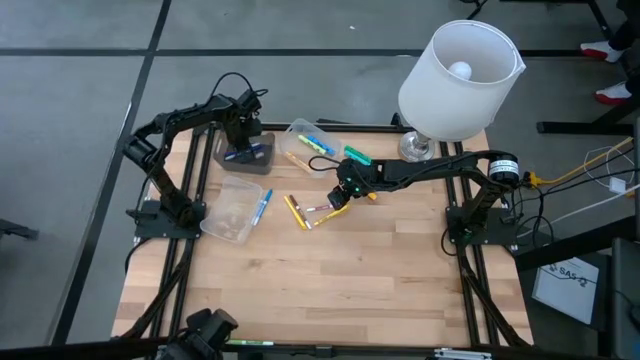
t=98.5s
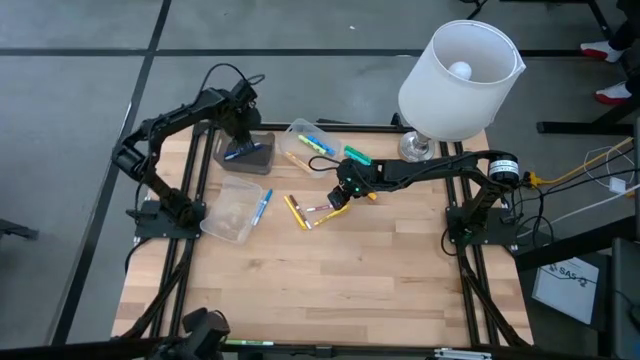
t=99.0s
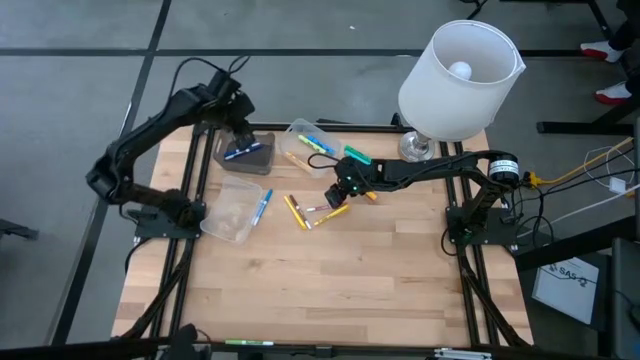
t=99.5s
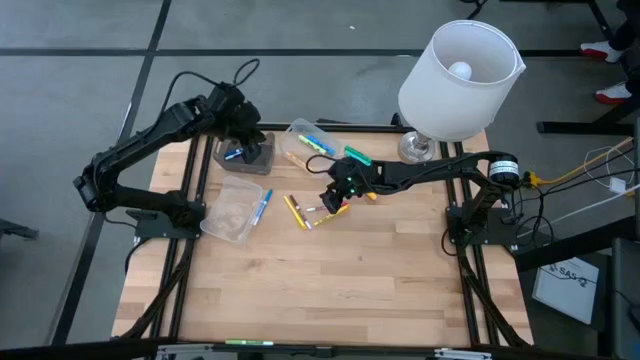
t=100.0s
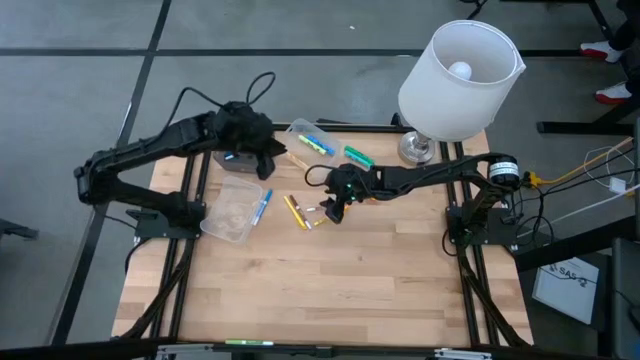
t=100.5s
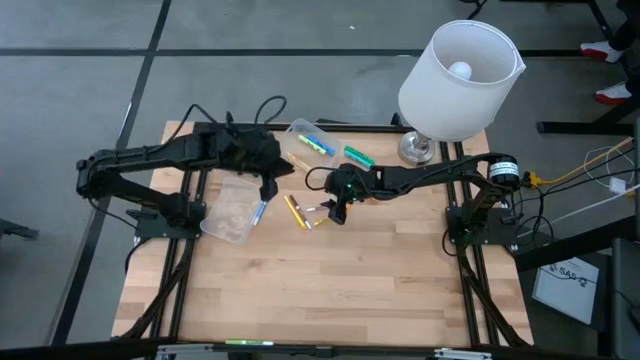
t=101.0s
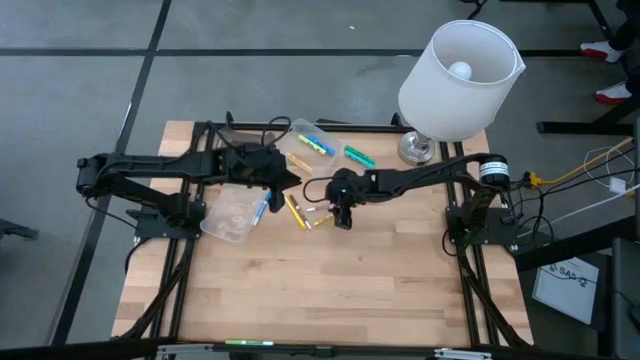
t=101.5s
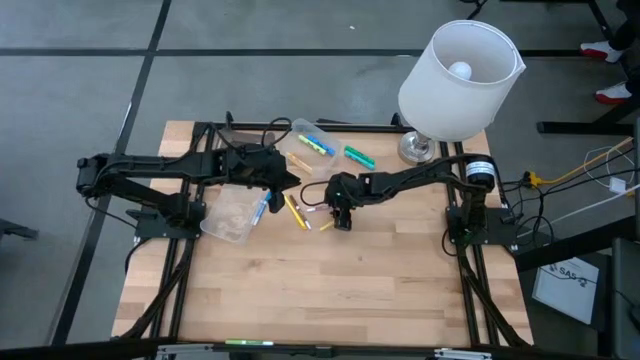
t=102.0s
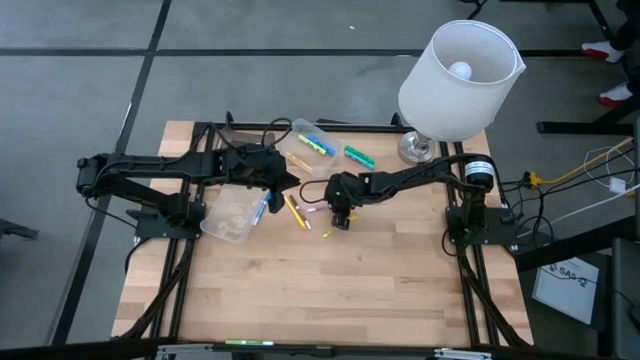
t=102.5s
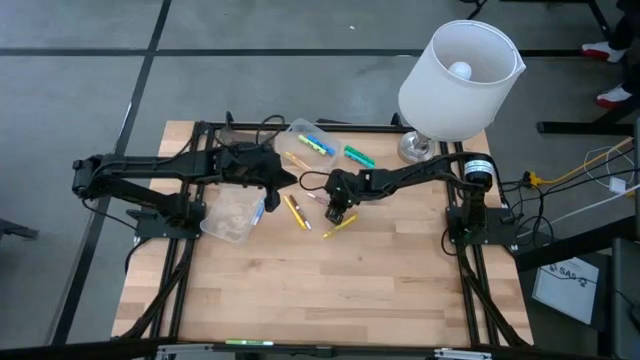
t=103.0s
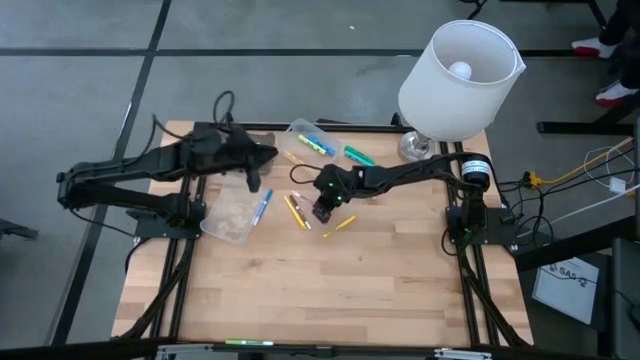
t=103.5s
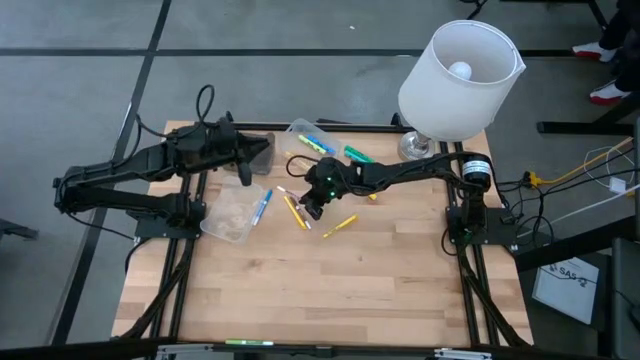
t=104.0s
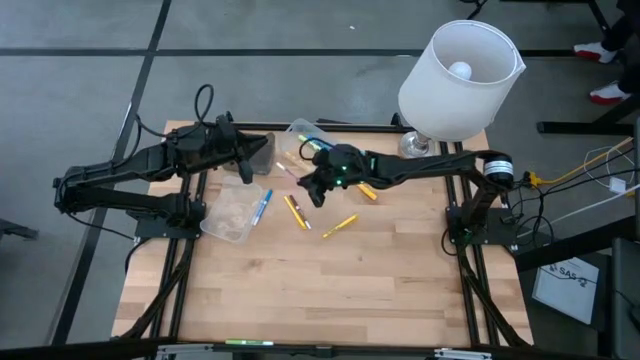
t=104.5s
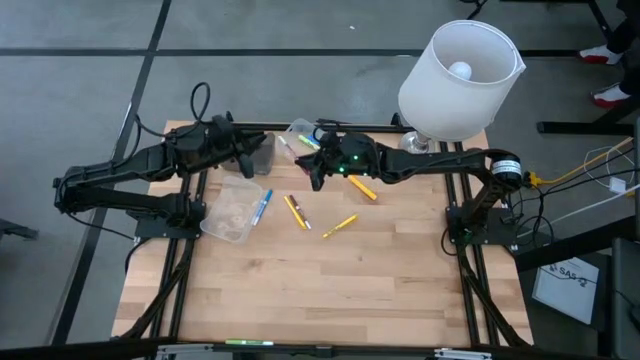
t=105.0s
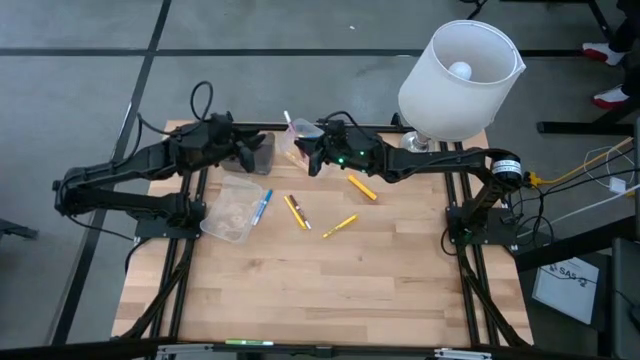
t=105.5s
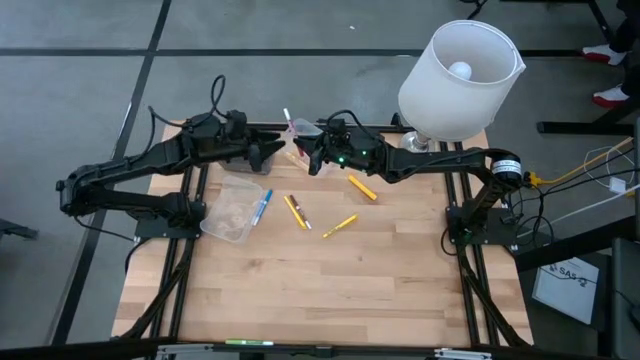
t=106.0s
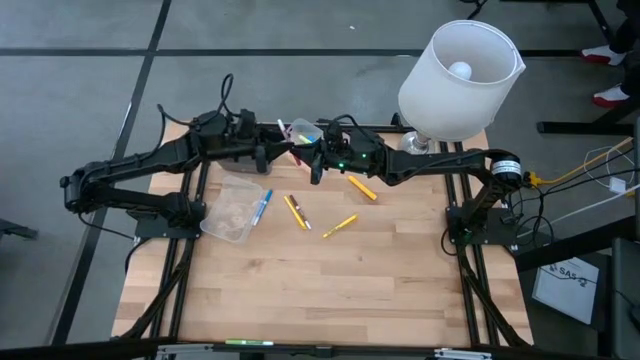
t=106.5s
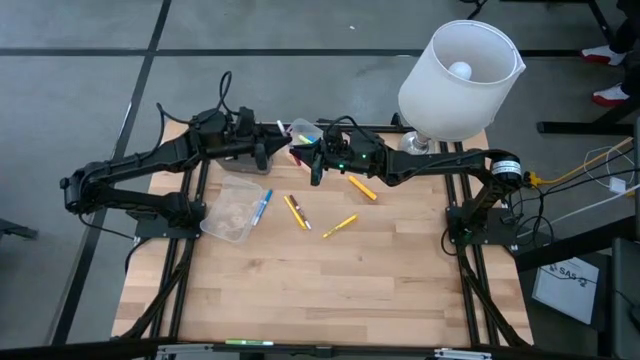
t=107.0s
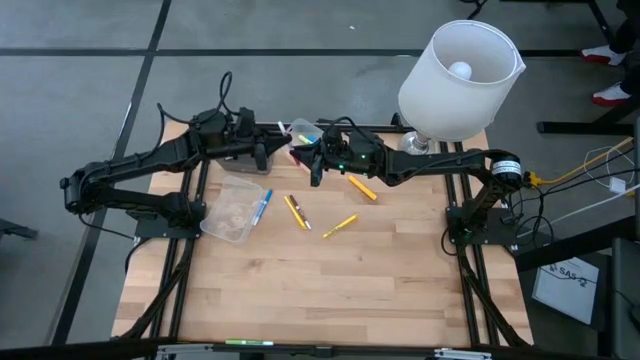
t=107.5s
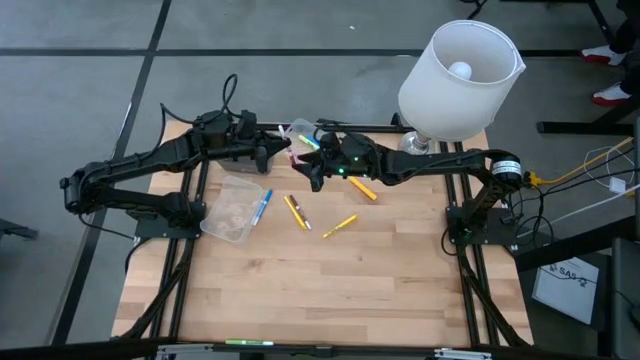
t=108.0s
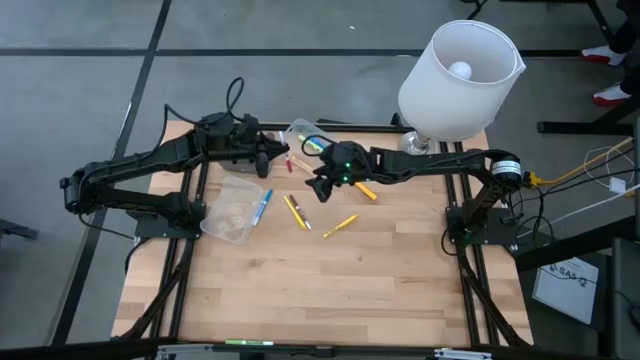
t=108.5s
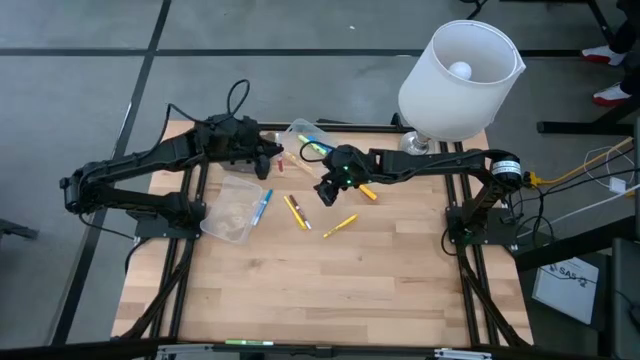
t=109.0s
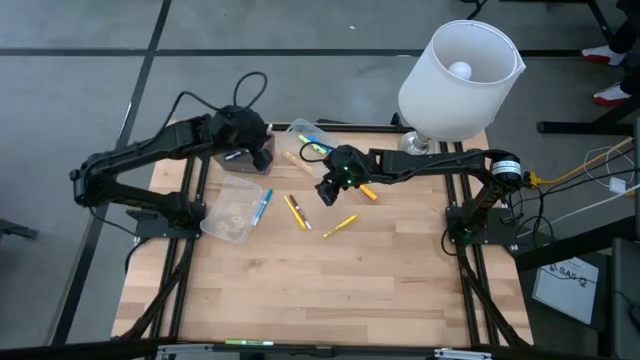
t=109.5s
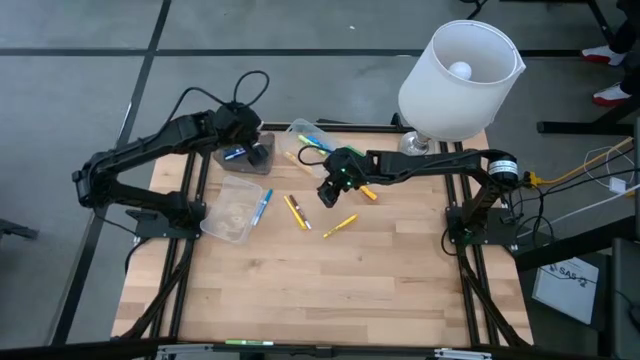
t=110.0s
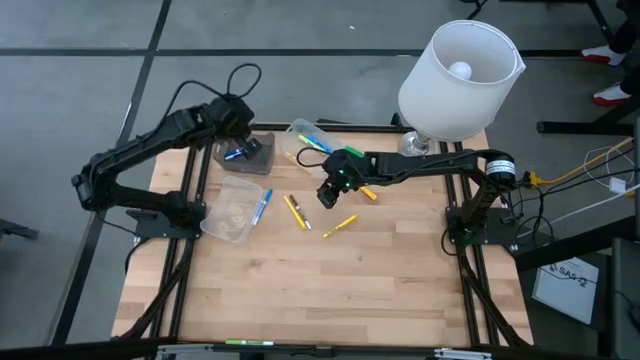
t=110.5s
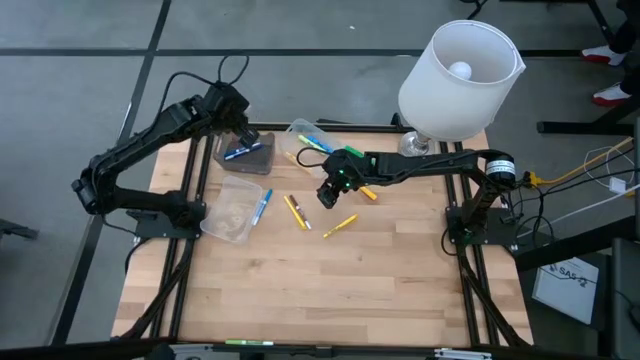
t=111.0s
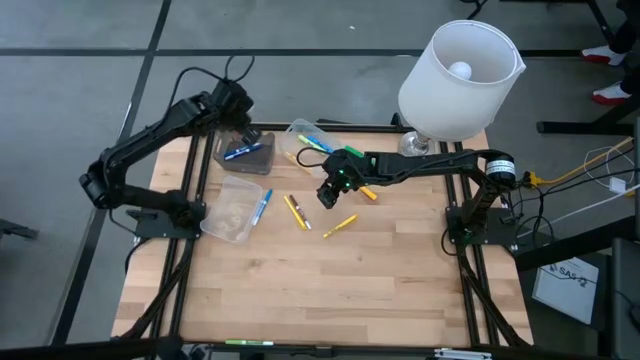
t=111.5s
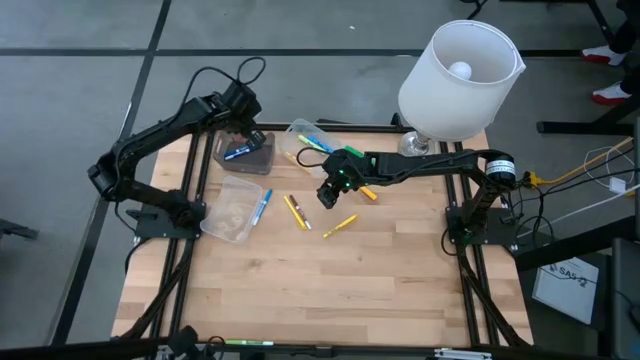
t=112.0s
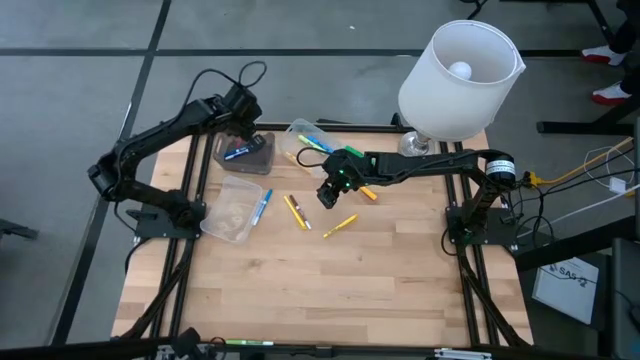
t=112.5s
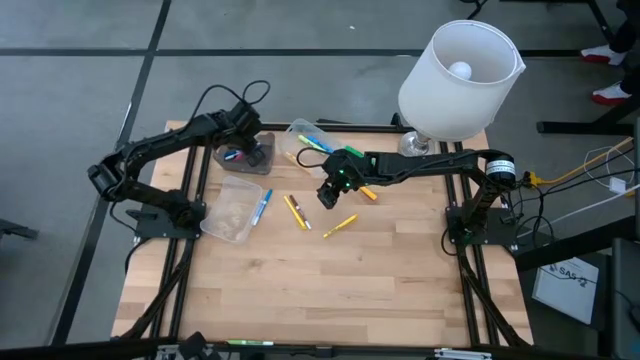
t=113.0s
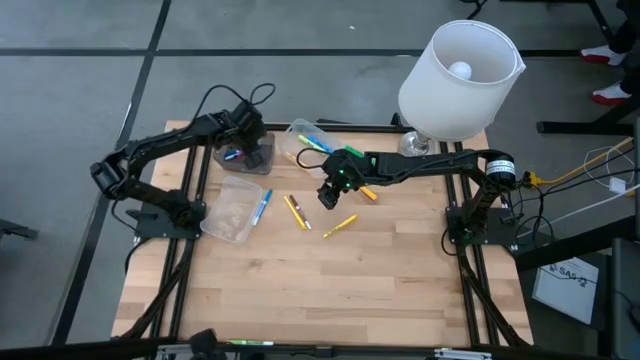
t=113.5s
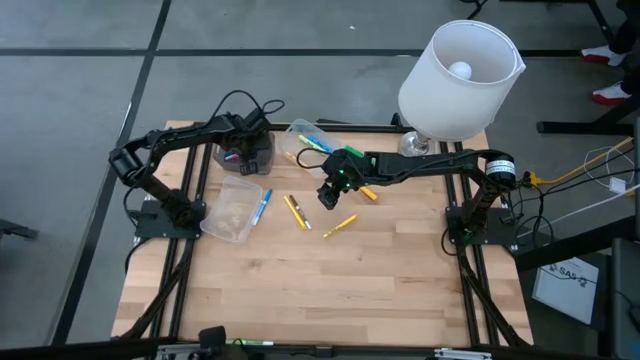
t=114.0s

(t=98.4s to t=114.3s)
Task: Pick & Place Markers
Put the pink marker into the black bin

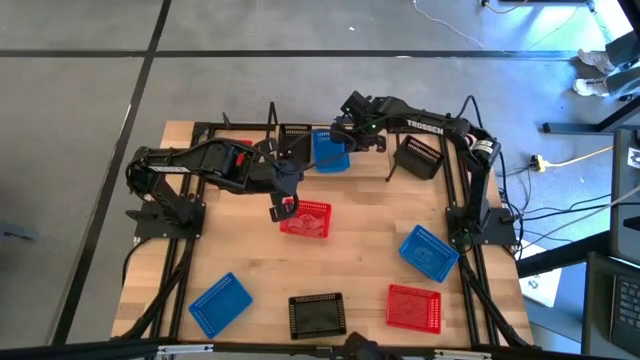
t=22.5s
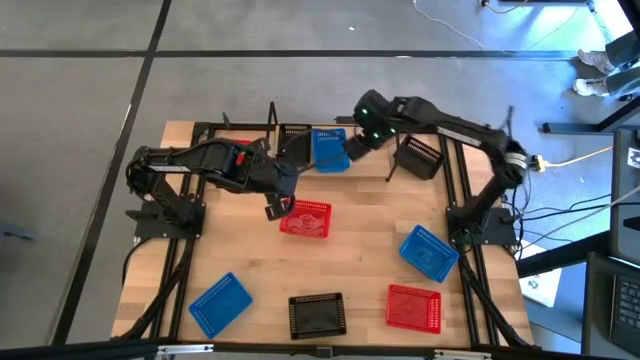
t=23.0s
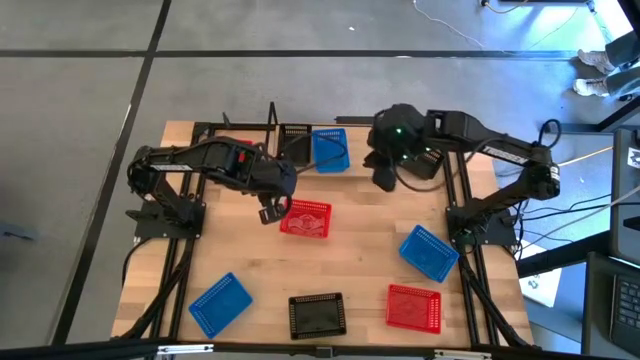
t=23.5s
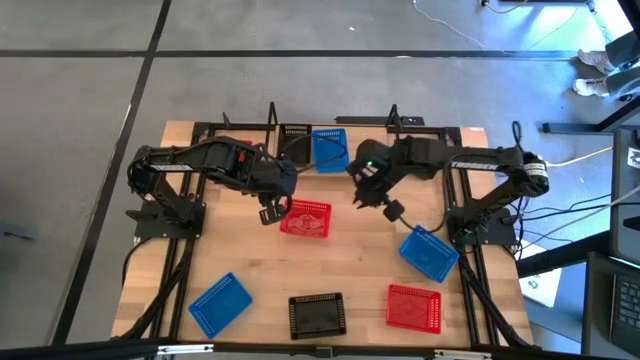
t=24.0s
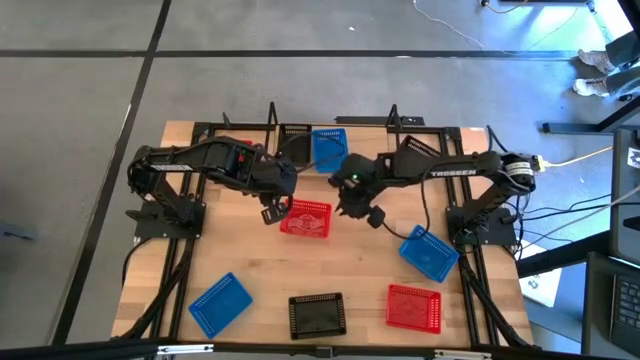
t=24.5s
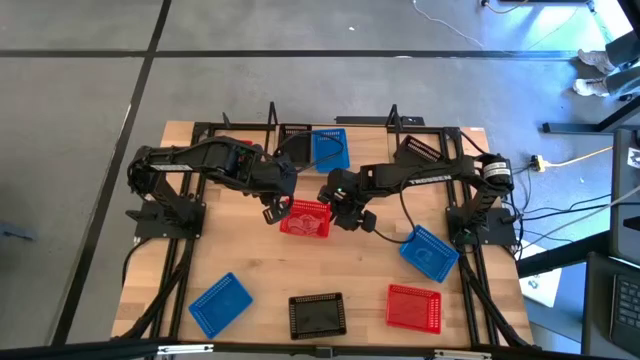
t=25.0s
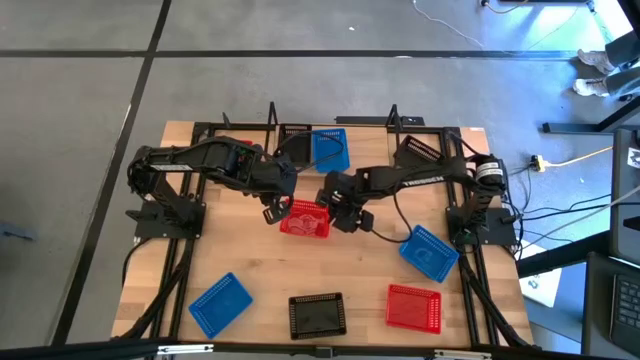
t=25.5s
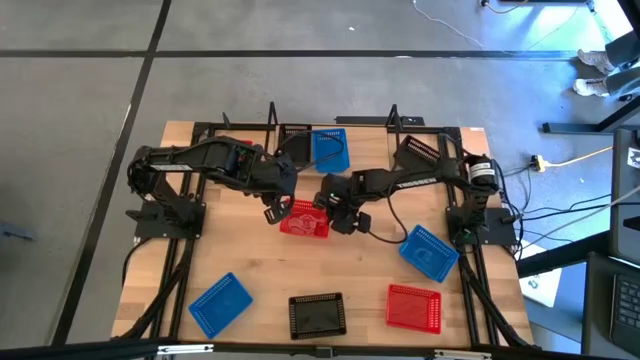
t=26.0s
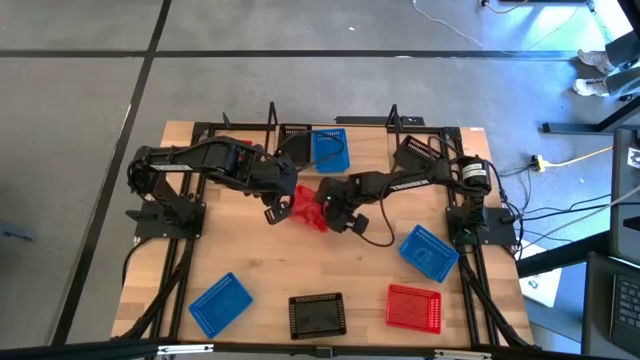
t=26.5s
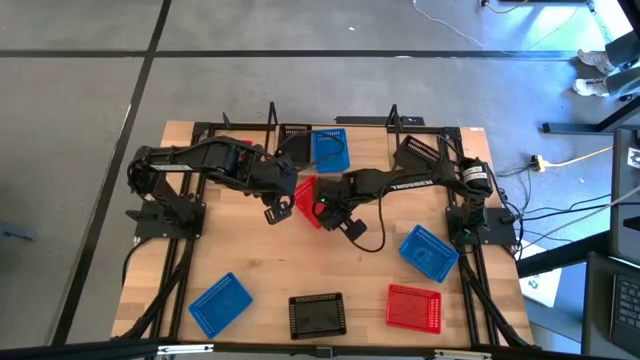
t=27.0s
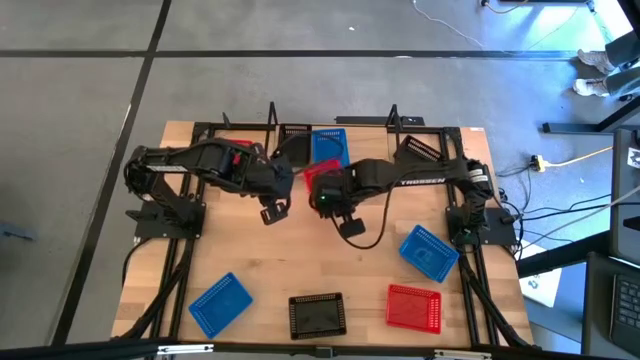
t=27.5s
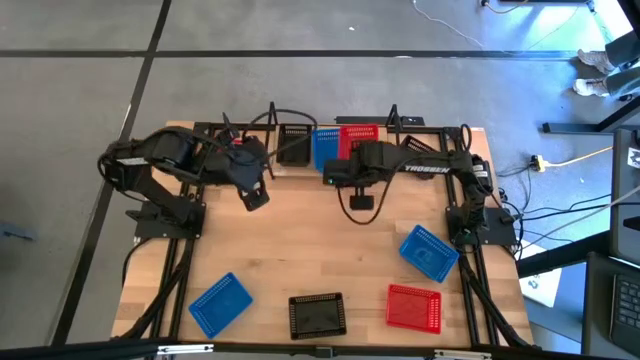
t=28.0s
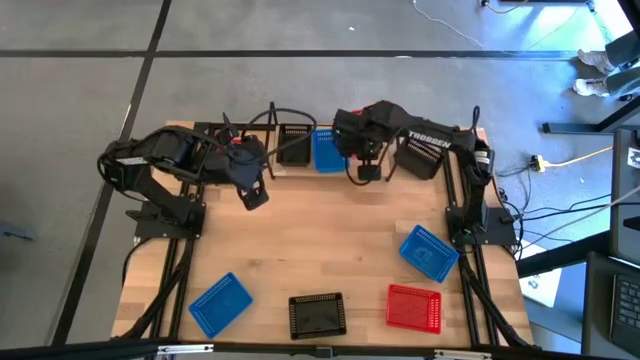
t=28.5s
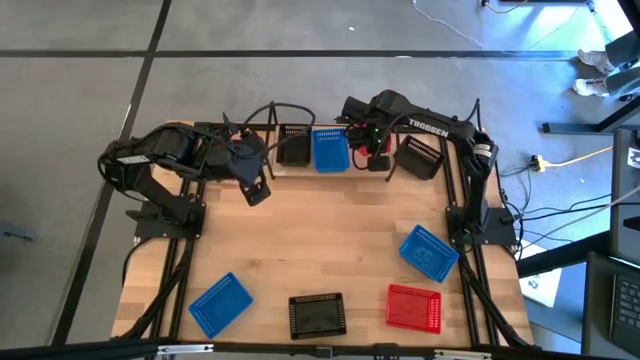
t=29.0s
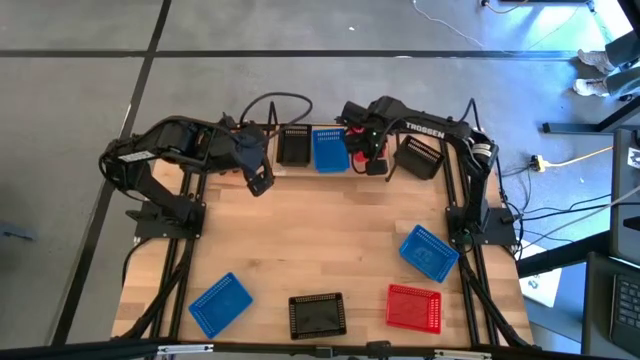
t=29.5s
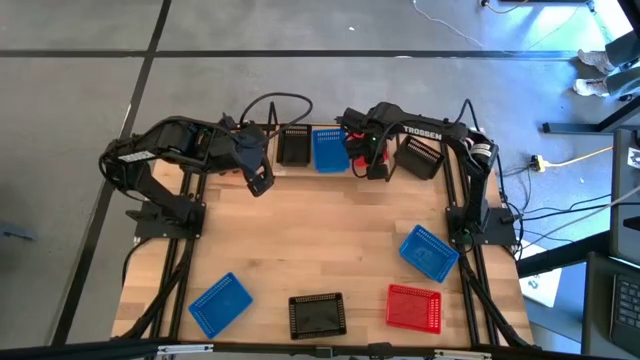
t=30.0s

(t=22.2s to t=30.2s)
Task: Stack baskets on shelf by color
Put the middle red bin on the shelf
